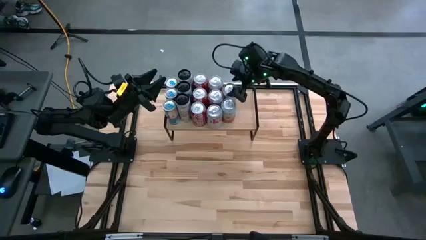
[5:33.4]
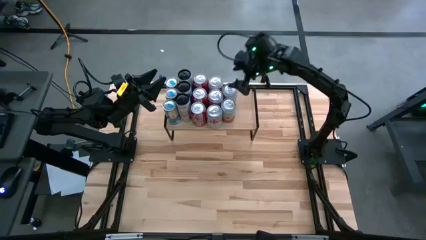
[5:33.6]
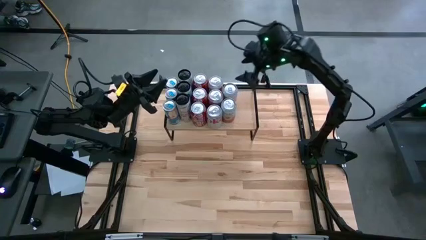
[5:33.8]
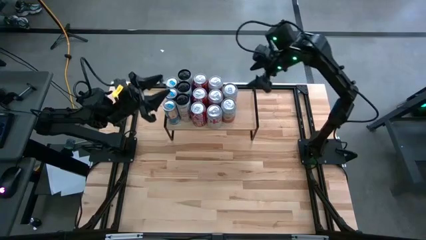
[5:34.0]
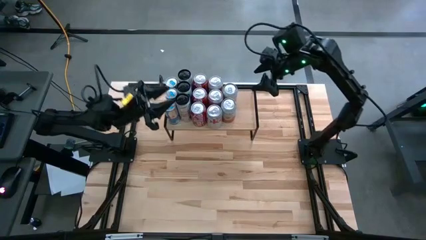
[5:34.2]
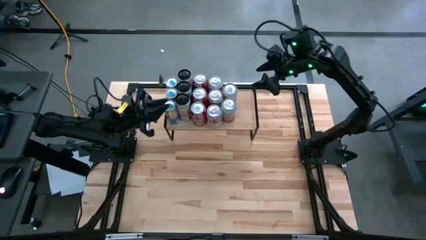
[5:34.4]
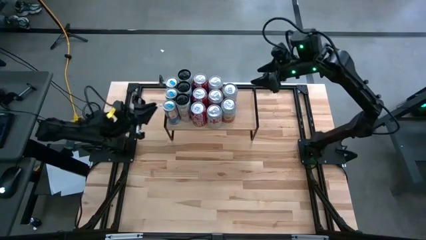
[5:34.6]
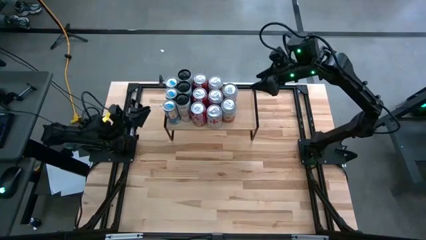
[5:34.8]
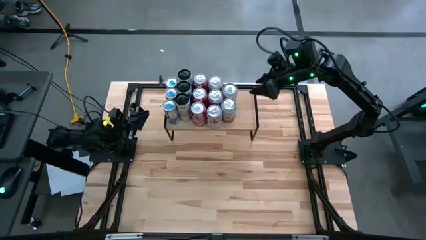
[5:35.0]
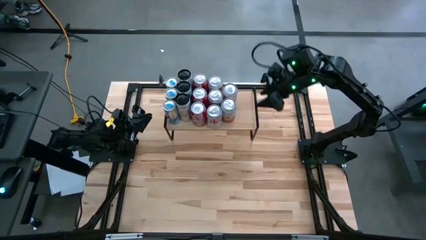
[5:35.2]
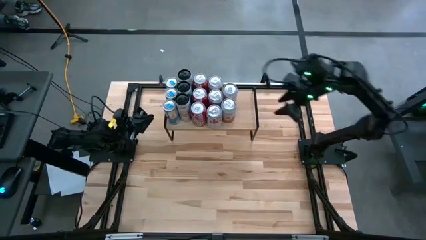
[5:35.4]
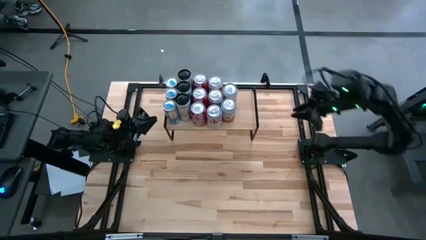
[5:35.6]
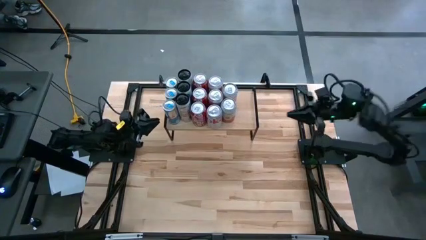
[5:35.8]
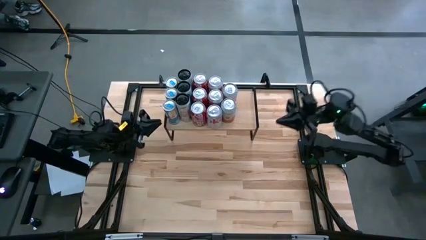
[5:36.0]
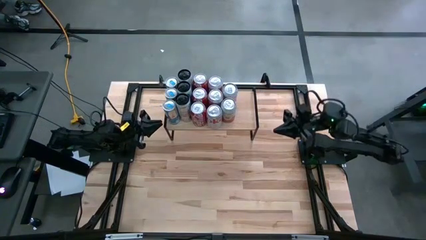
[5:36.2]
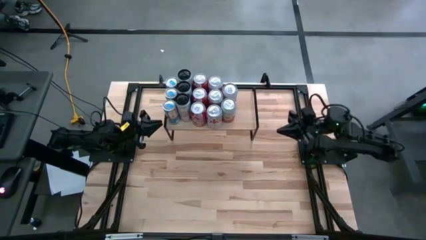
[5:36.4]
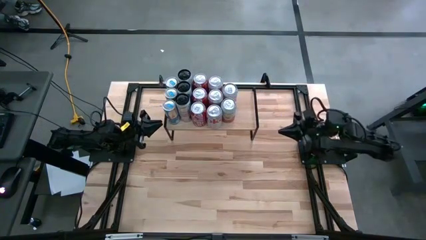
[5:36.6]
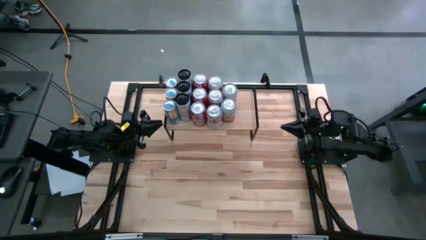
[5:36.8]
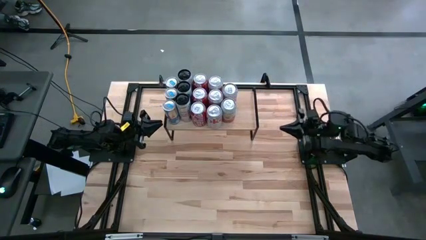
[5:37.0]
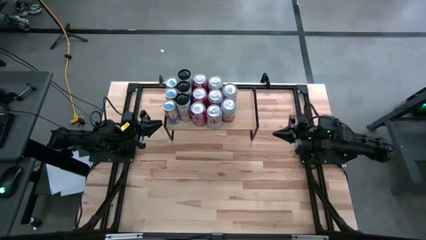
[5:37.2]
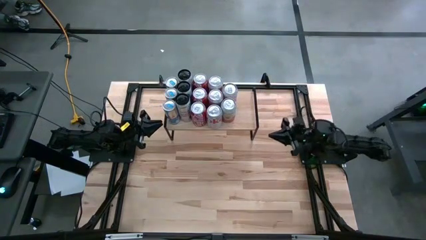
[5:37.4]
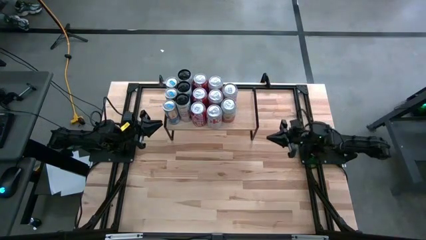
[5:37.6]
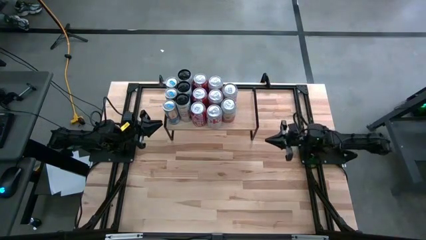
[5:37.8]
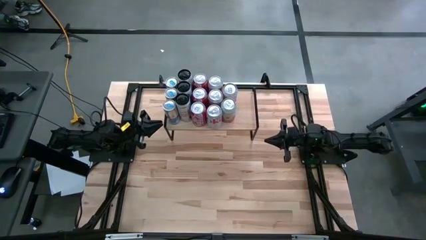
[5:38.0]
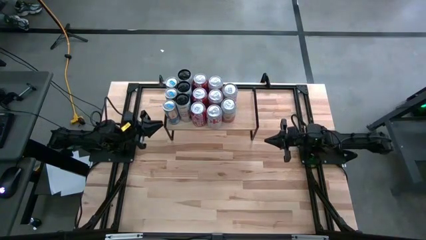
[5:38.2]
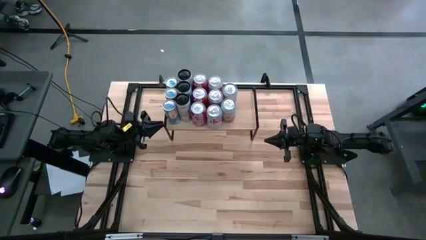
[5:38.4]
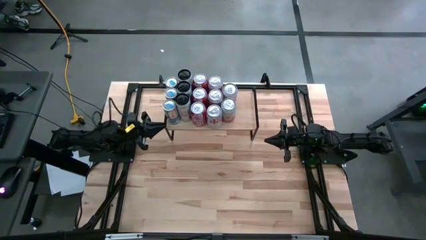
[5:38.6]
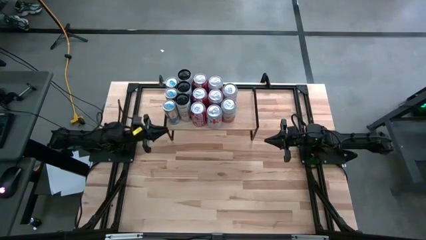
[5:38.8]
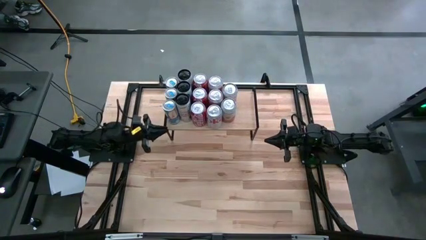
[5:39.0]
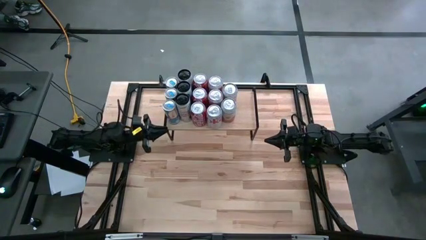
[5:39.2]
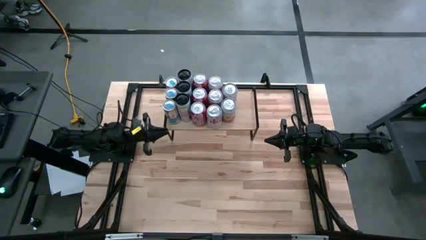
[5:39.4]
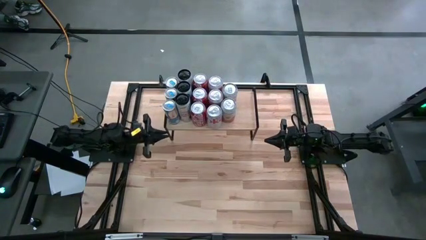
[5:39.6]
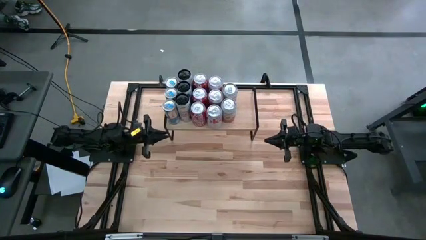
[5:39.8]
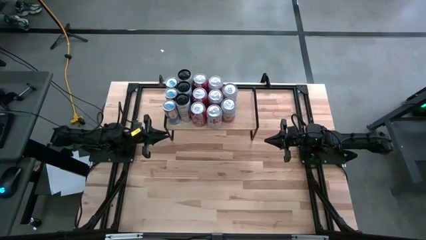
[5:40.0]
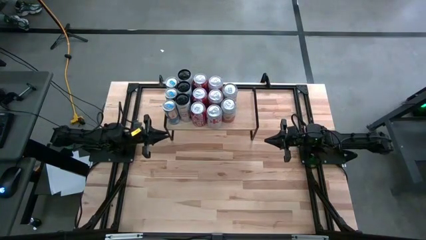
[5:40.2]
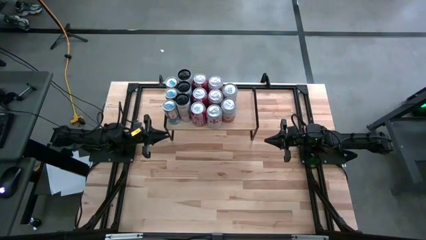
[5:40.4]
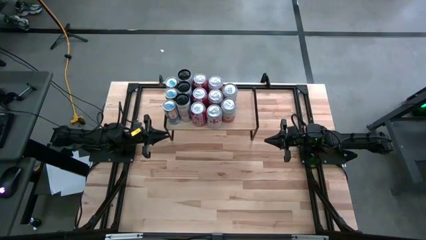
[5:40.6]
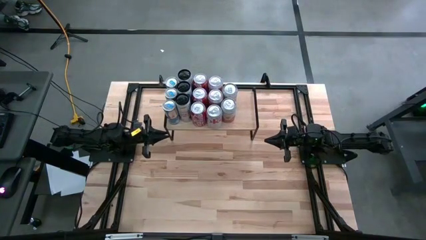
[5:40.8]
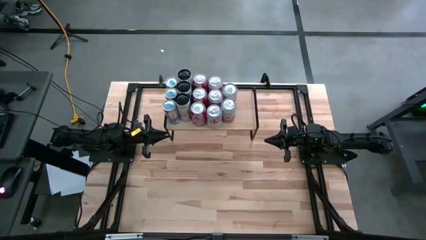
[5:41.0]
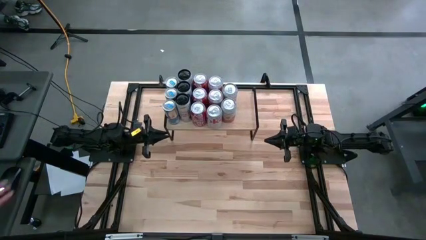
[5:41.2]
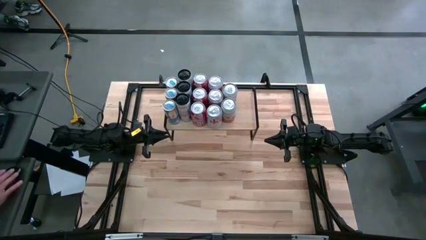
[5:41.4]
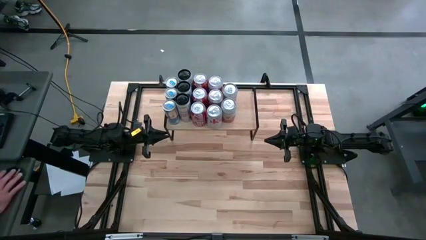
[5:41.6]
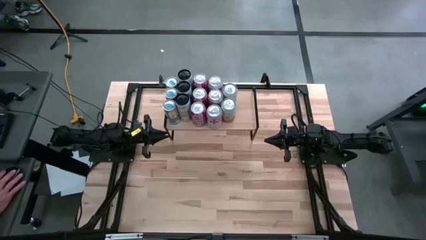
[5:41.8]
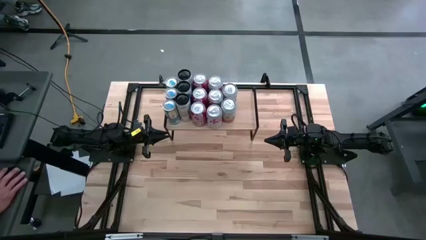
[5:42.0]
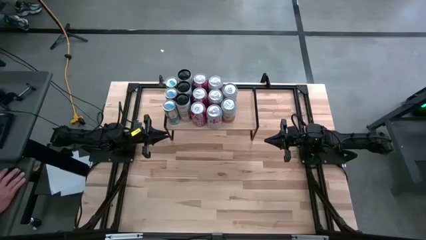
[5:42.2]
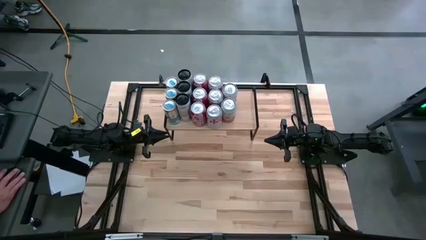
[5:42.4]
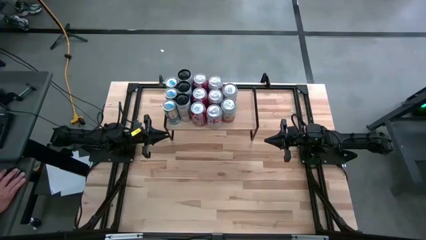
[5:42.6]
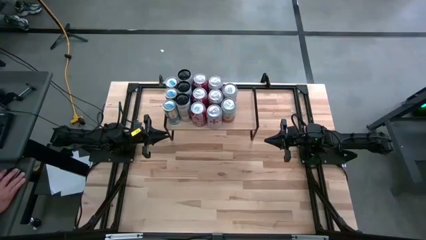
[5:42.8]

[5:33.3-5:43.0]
Task: Place canned beverage on shelf
Return to Home Position
